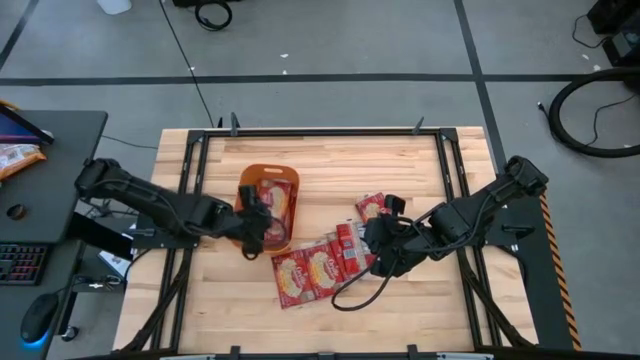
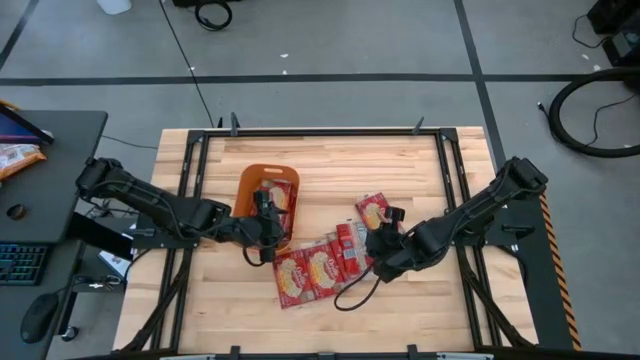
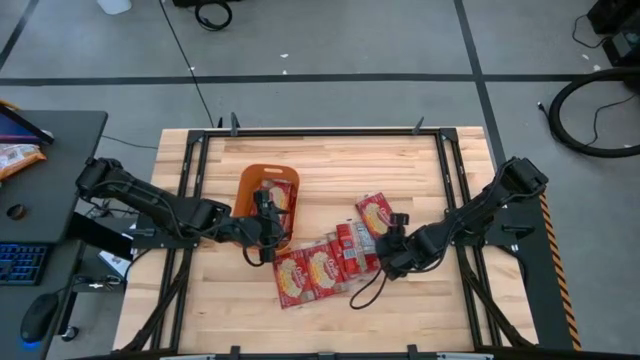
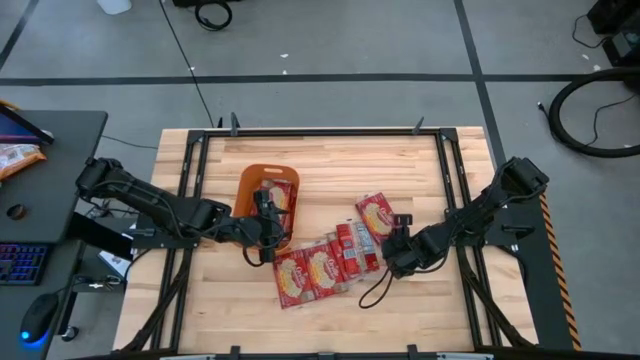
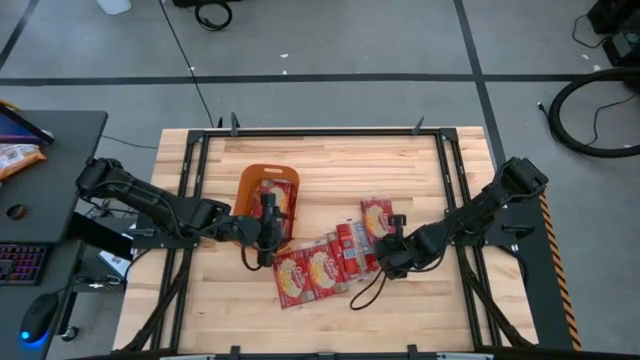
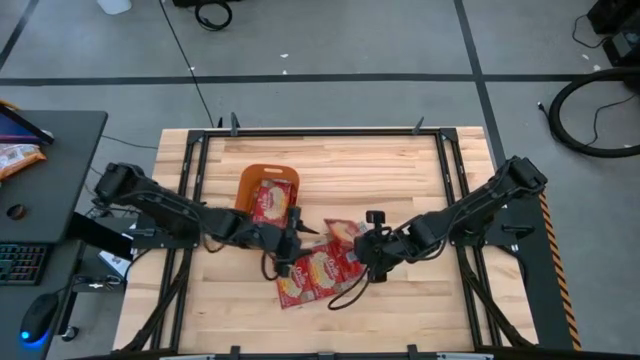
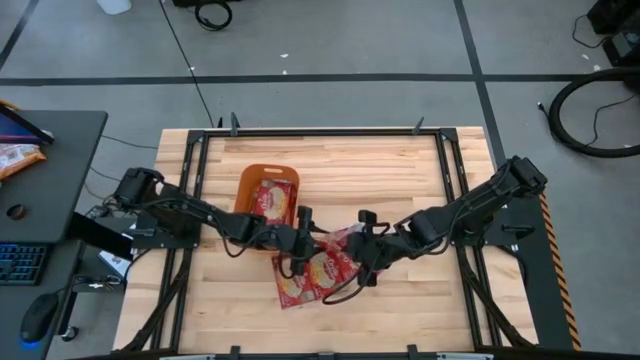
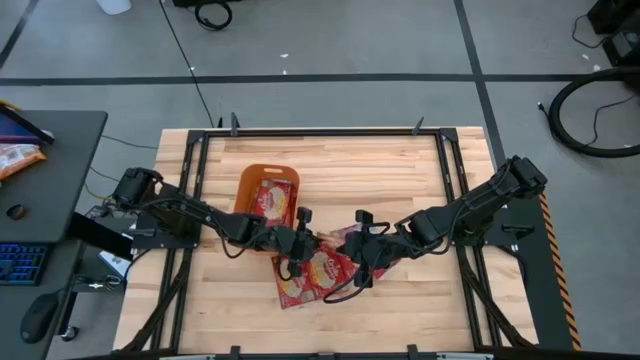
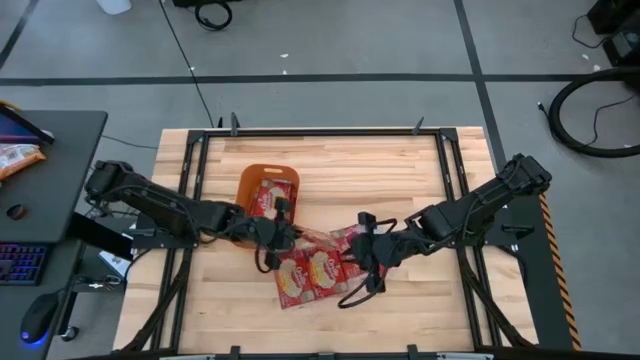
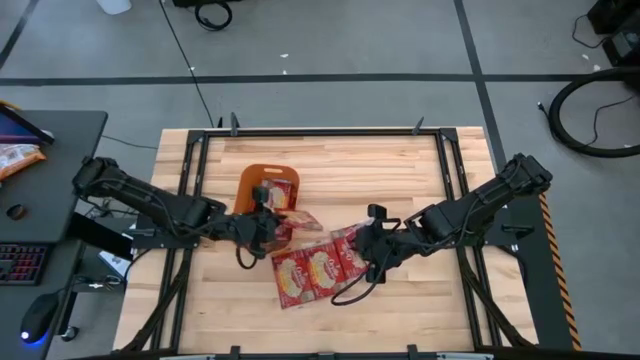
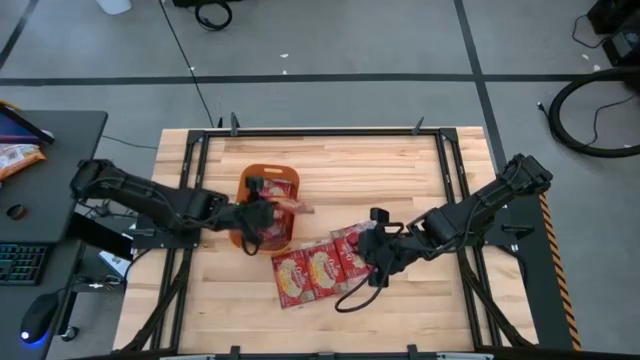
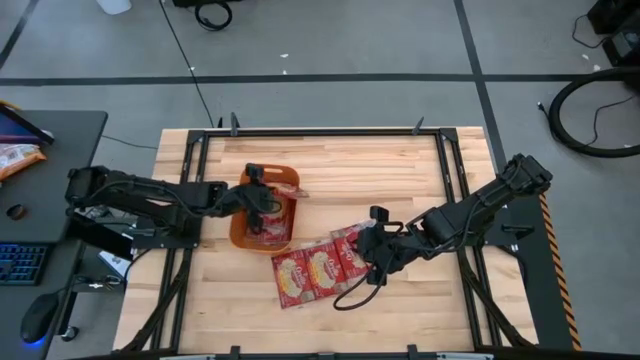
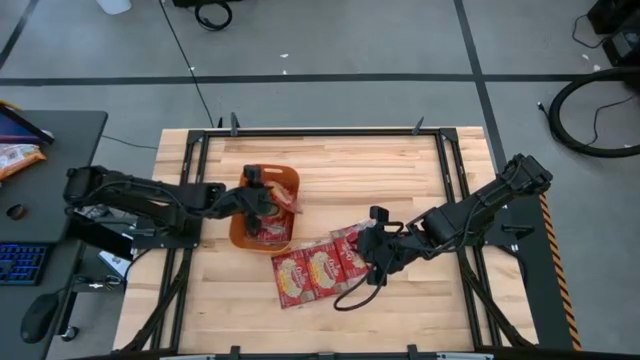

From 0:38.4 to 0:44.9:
Task: Sort popcorn bags into baskets
Put the red popcorn bag into the orange bin

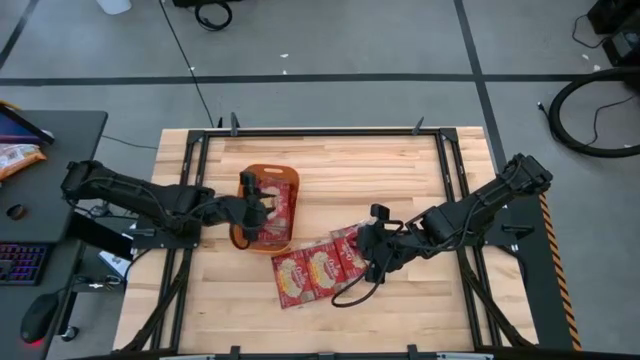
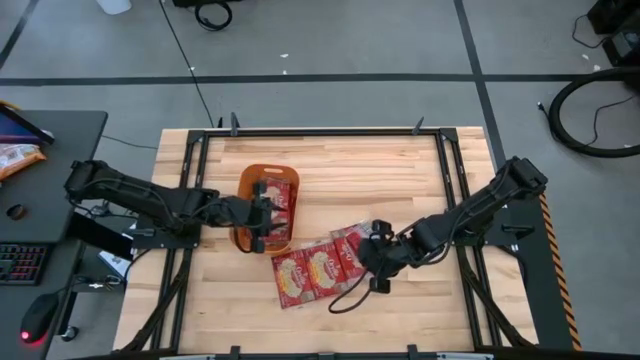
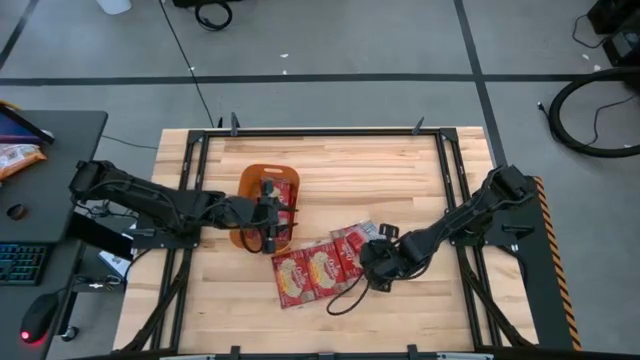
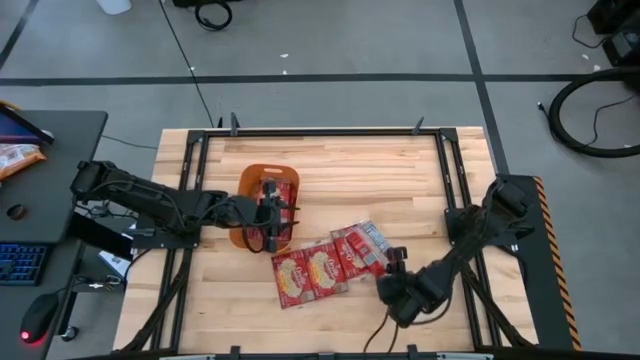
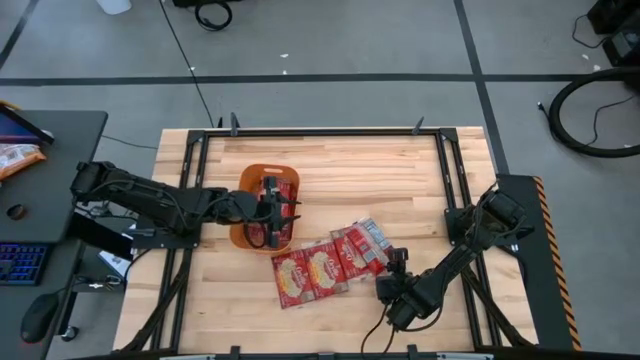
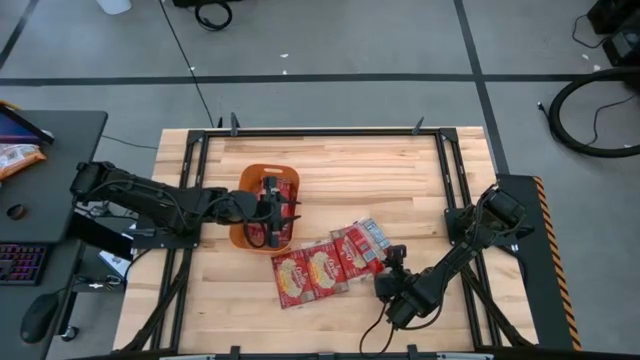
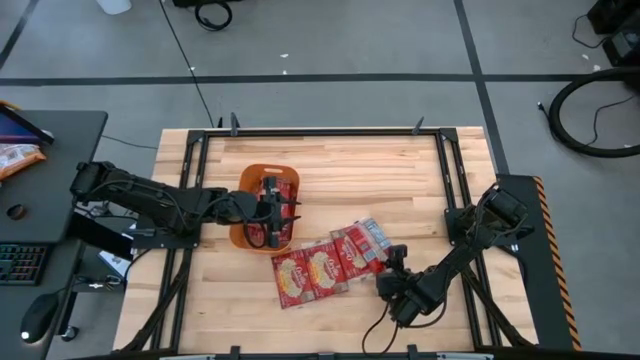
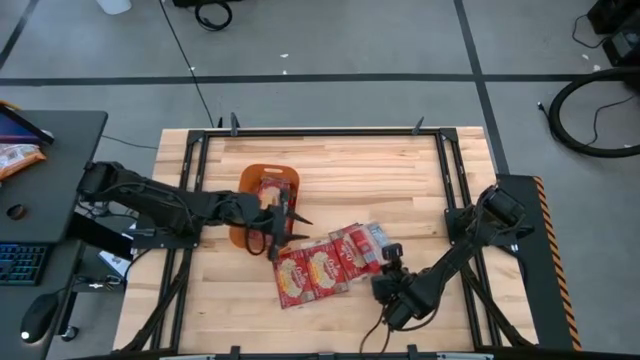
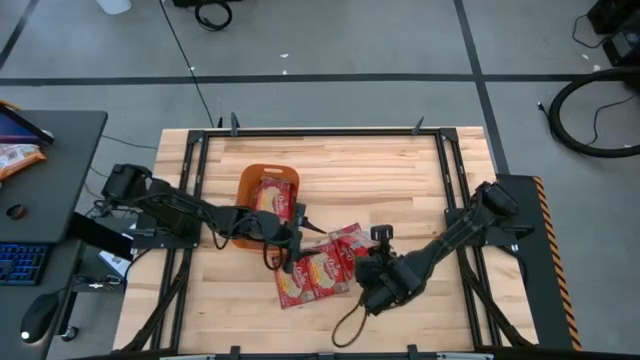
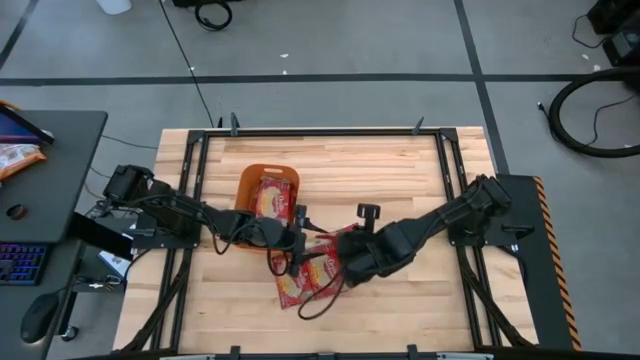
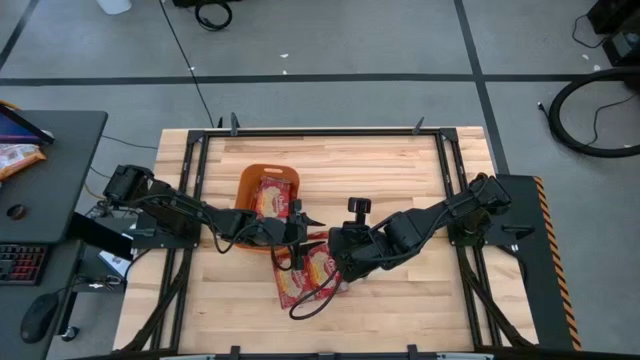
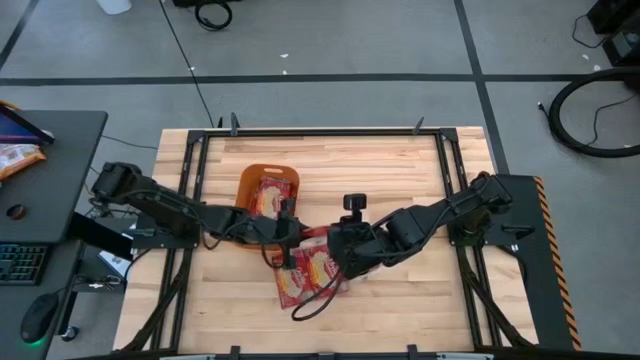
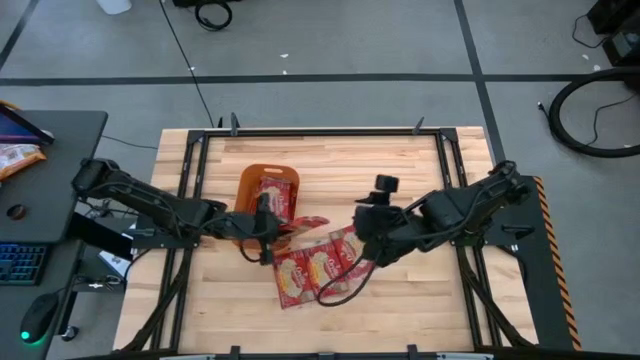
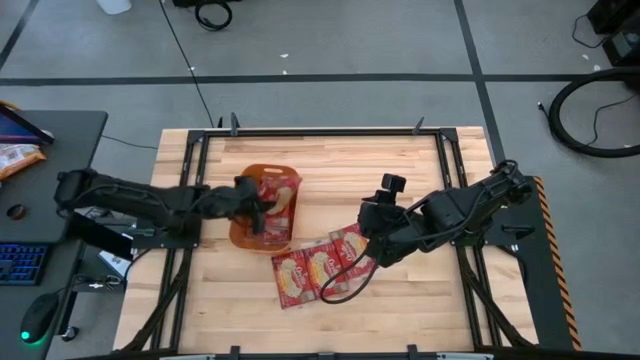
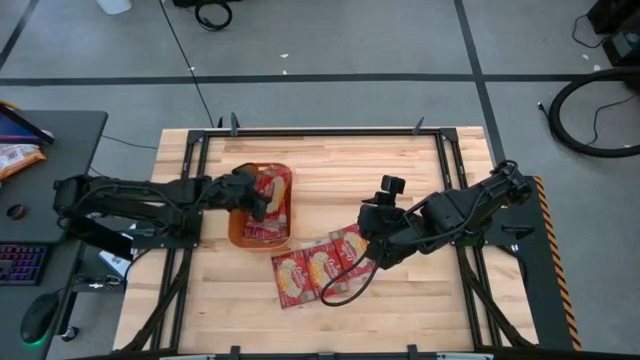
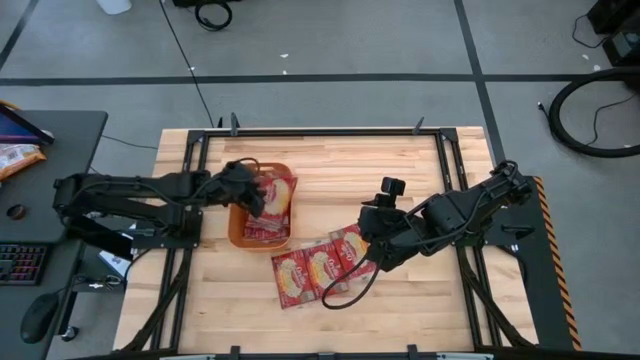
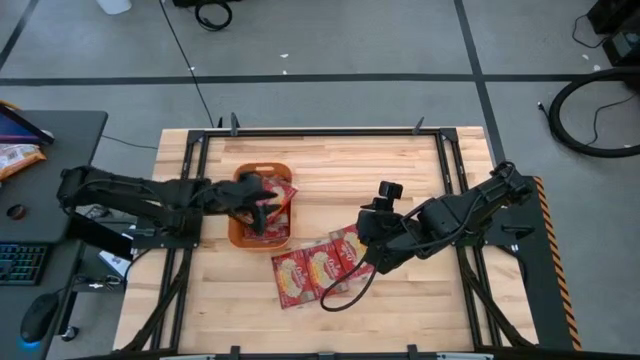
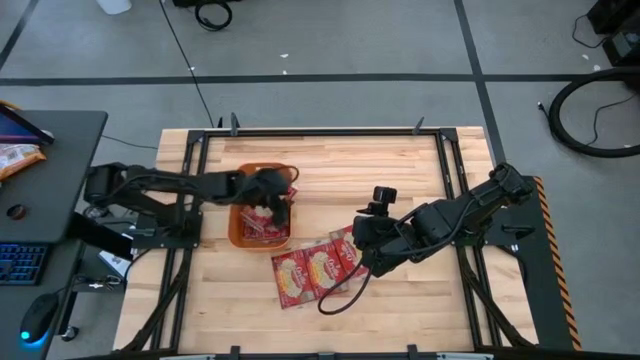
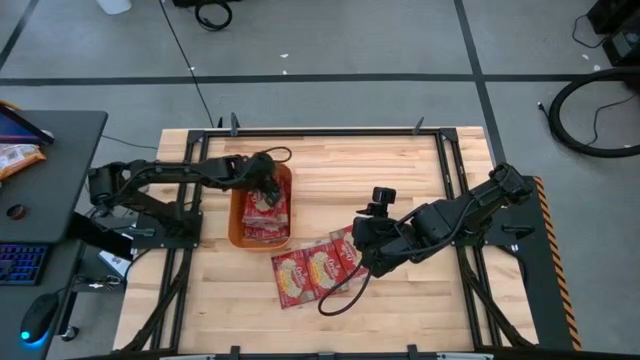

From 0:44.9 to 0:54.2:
Put the red popcorn bag into the orange bin

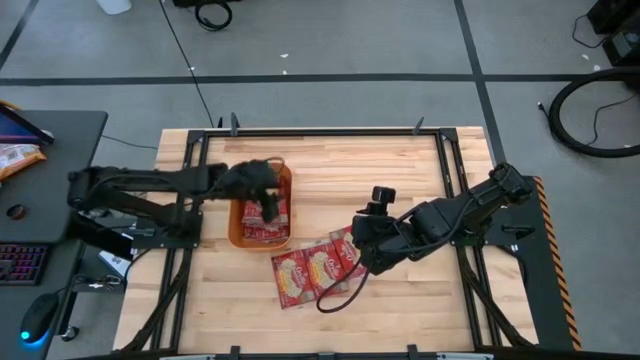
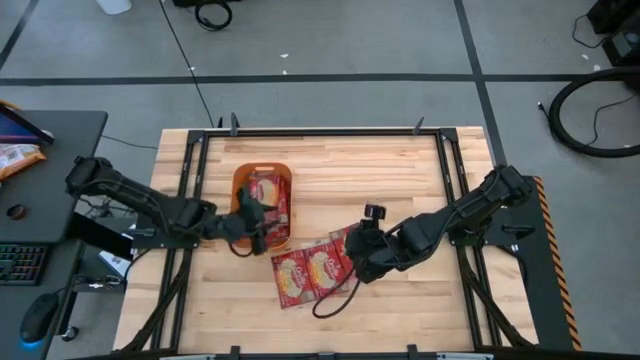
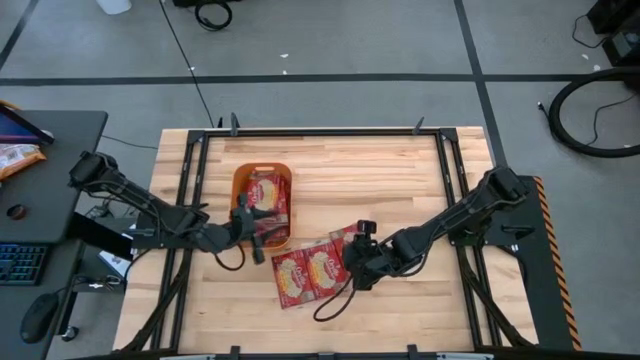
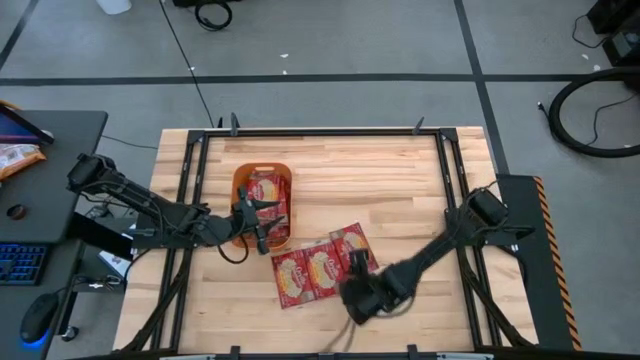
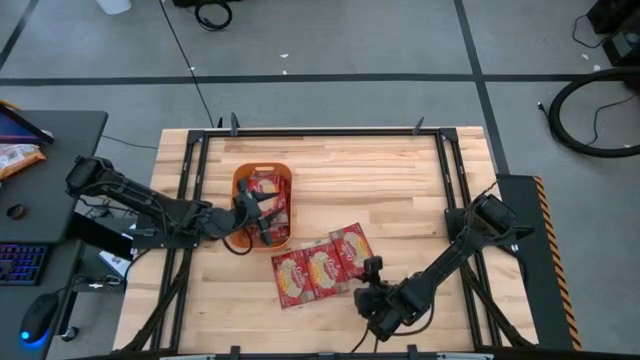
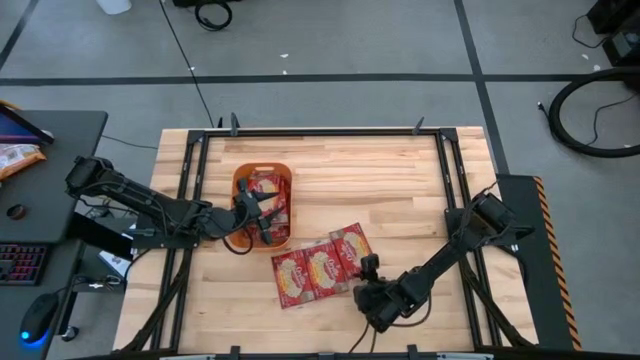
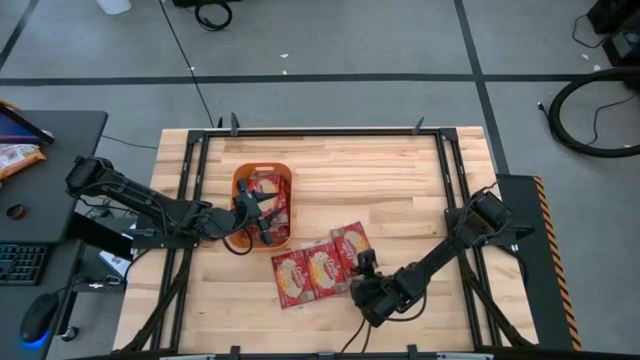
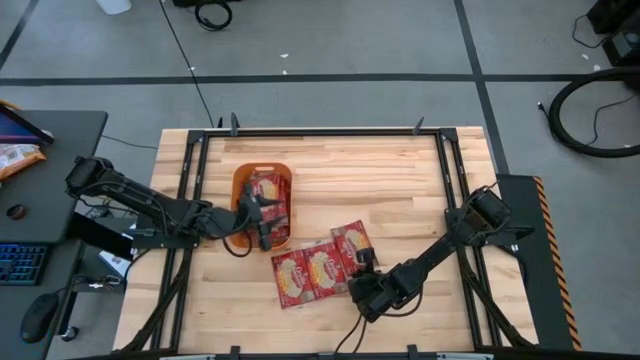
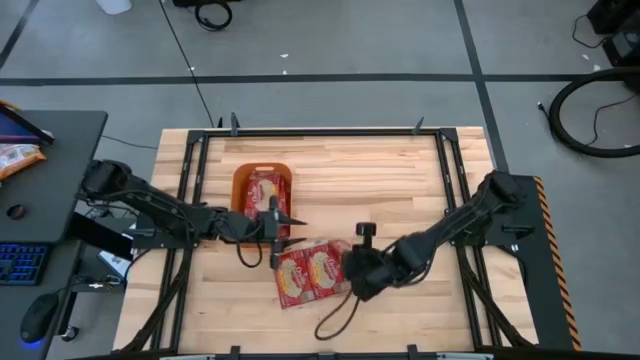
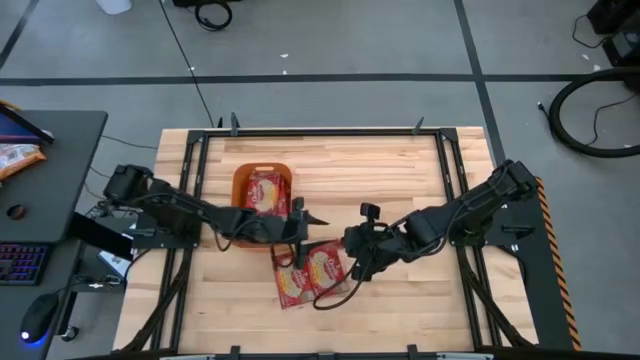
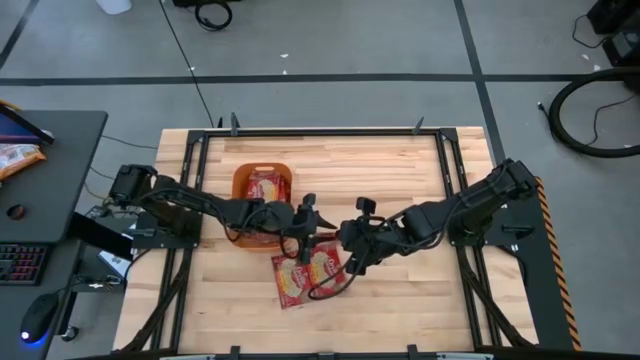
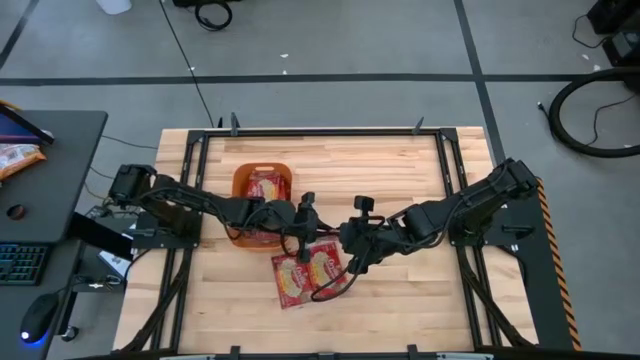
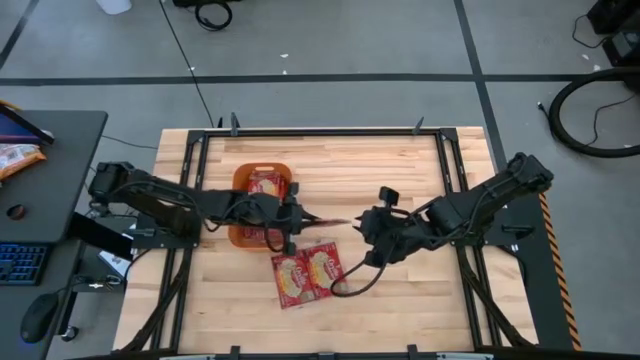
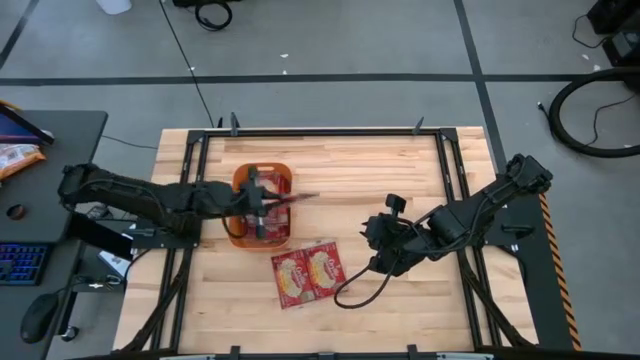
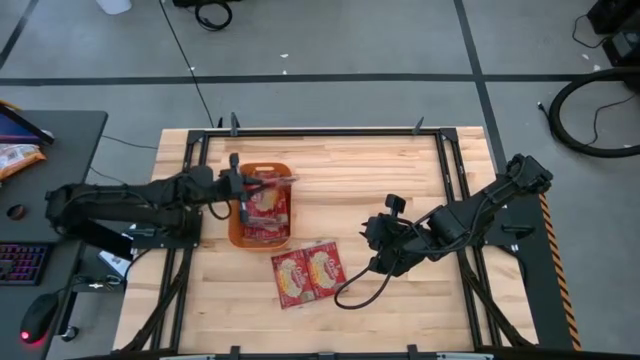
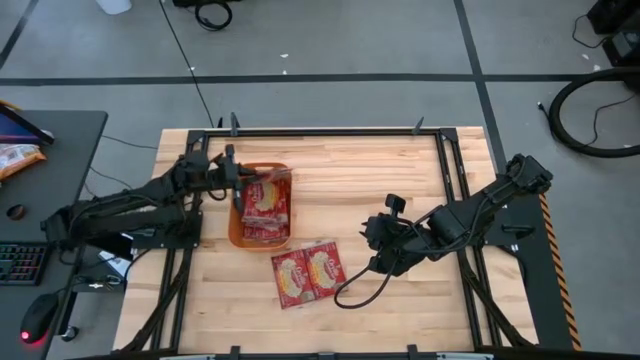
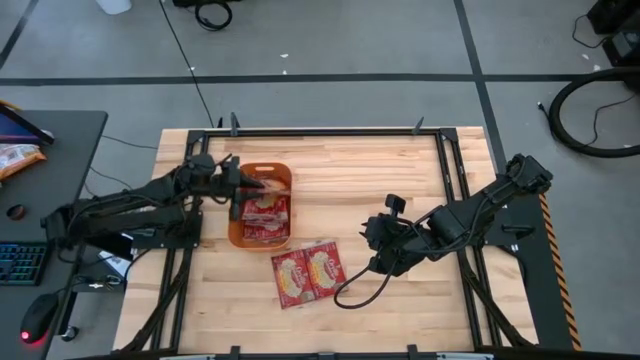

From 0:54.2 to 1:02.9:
Put the red popcorn bag into the orange bin
